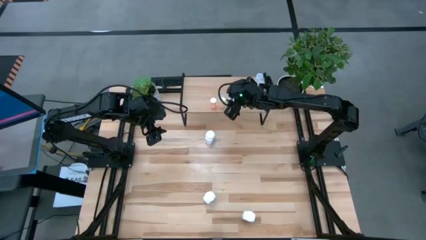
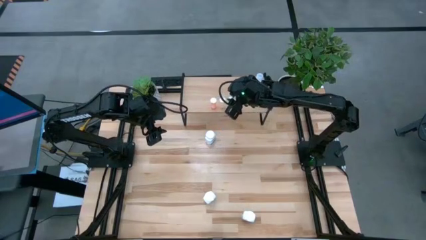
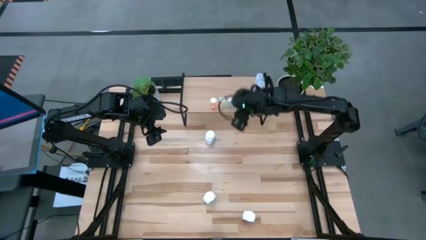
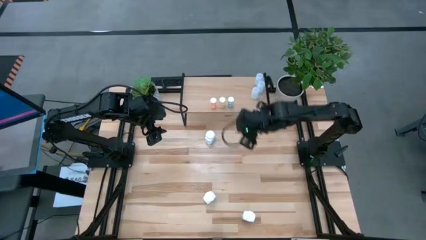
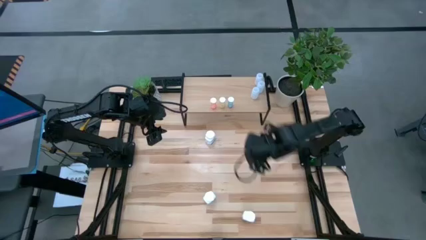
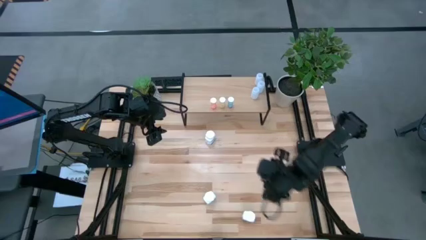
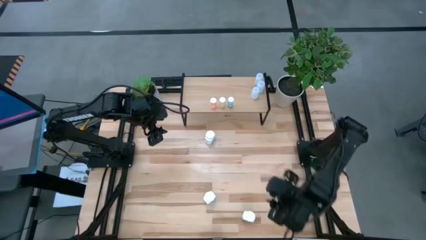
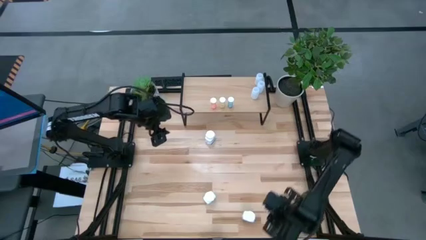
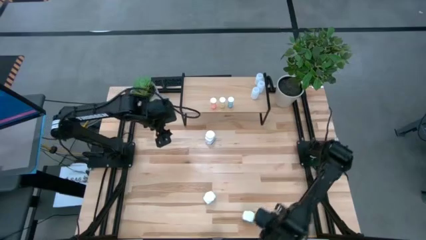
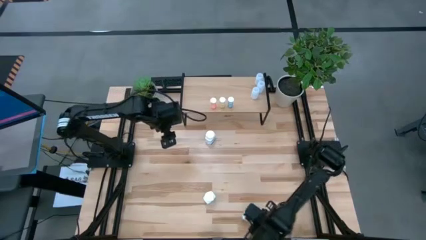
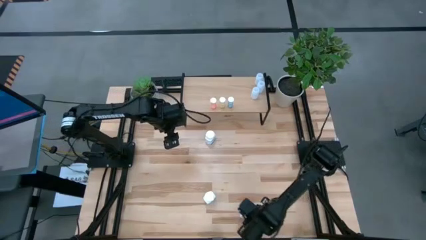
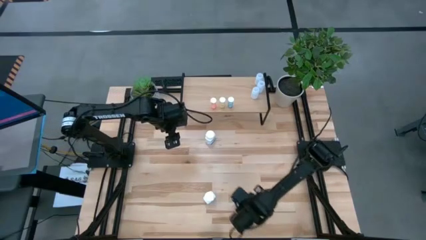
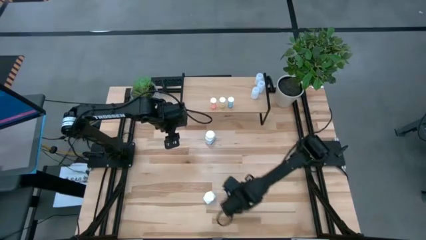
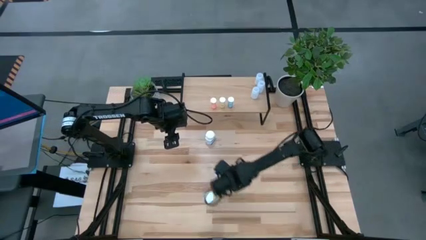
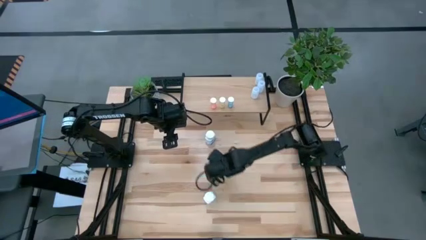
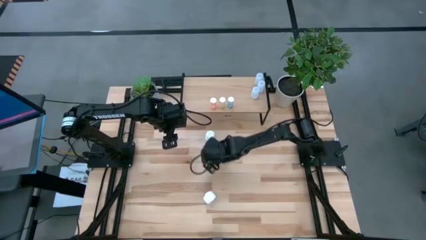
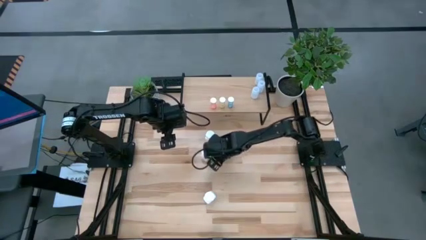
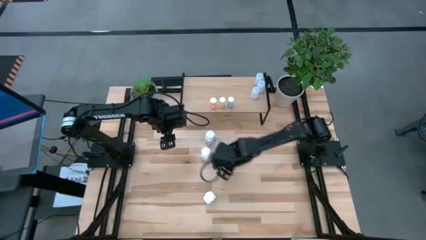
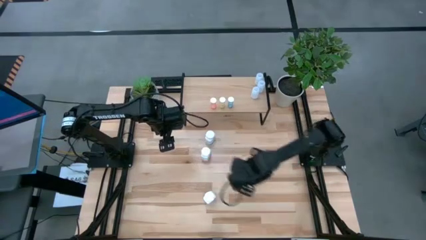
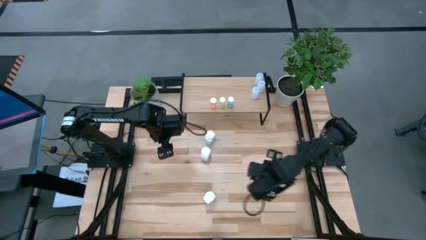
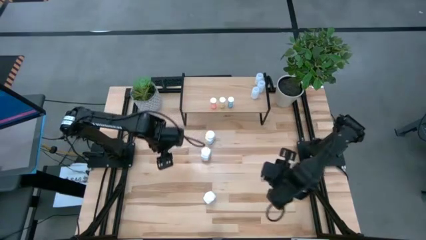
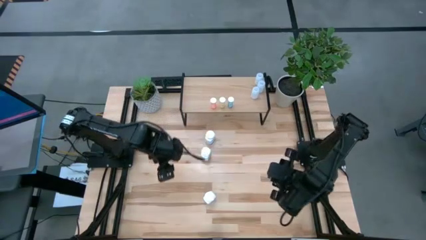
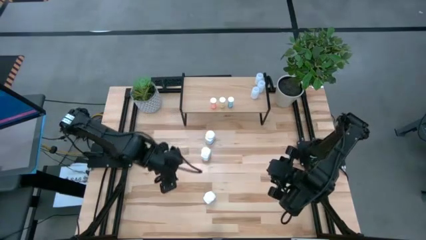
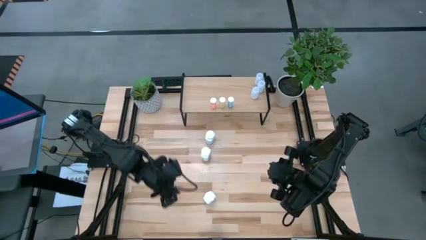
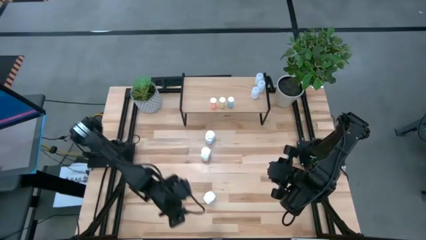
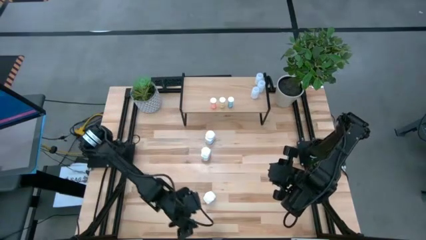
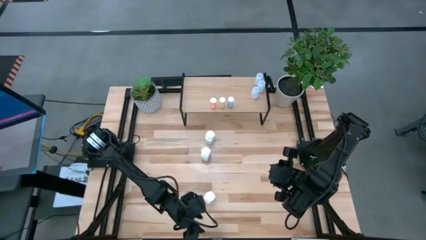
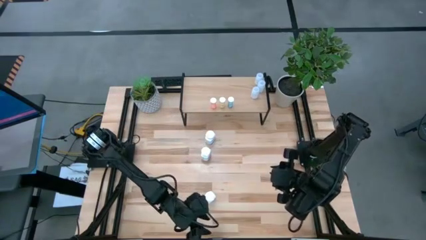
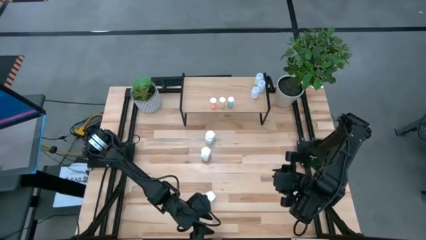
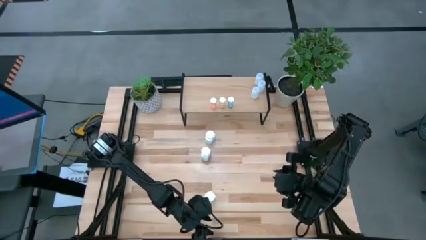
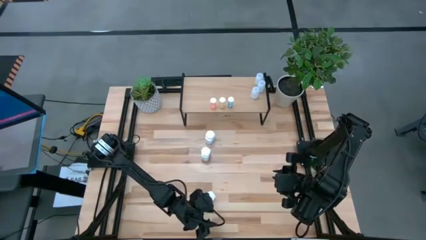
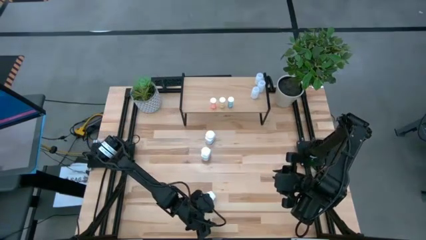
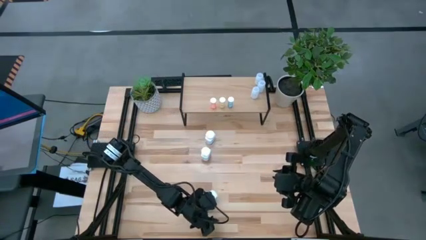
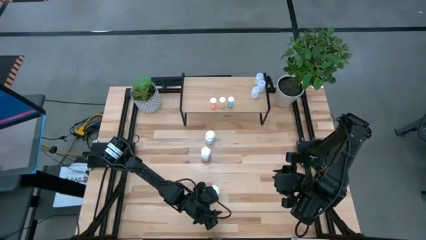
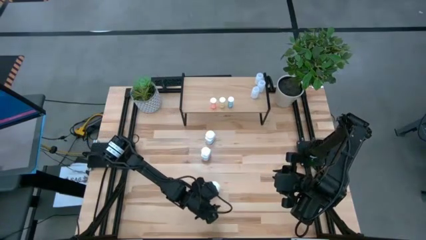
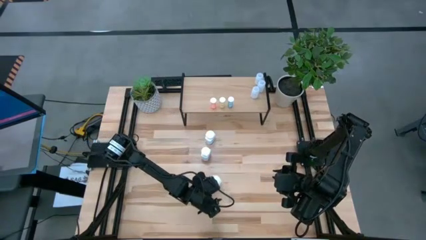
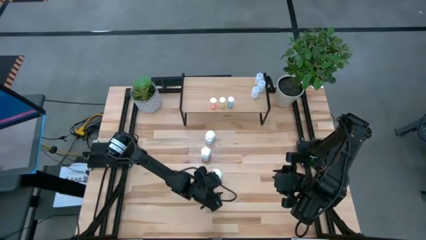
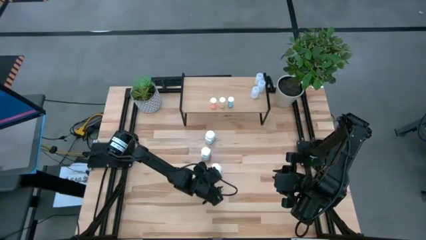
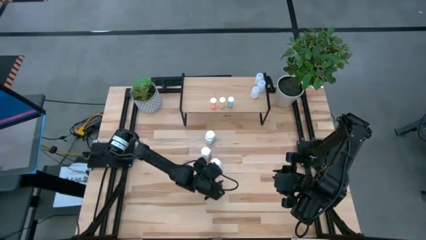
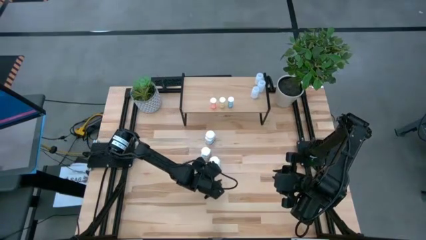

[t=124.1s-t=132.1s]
Task: Pick and place medicine bottles onto shelf by color
Move the white medicine bottles

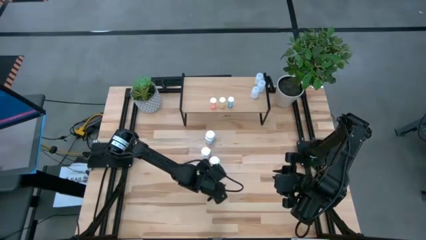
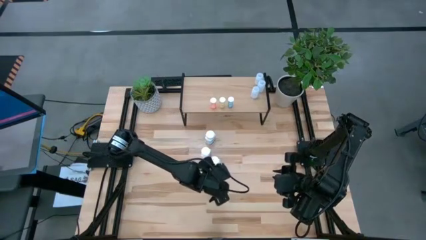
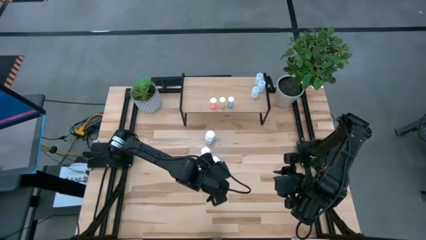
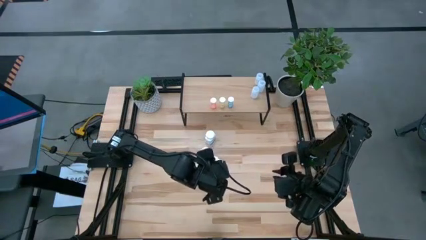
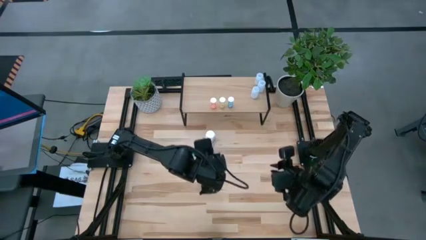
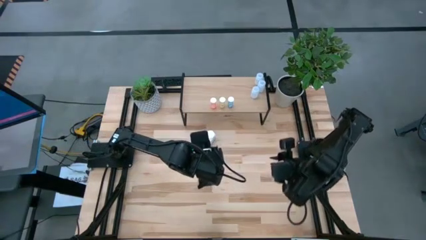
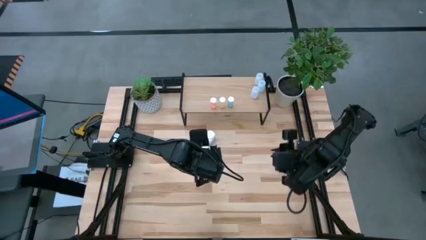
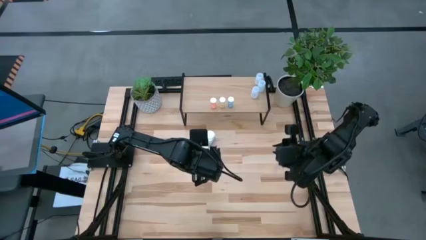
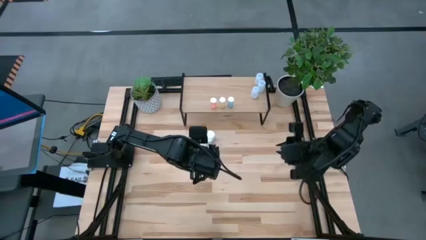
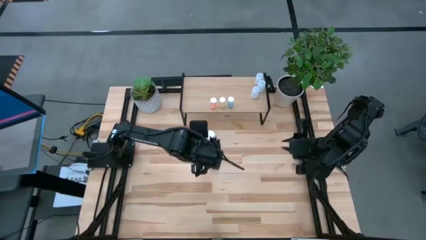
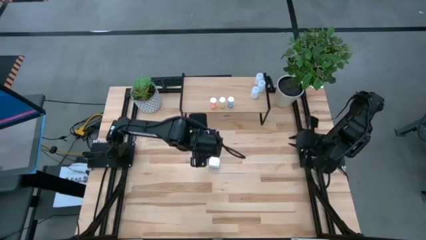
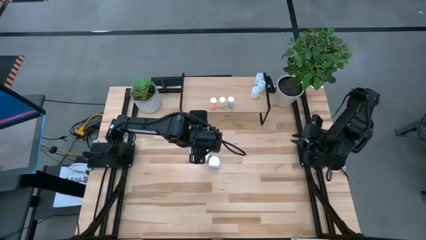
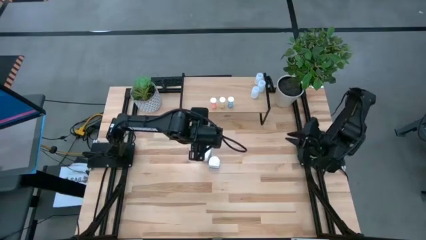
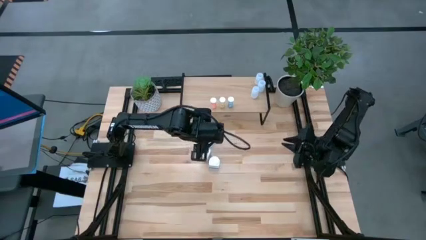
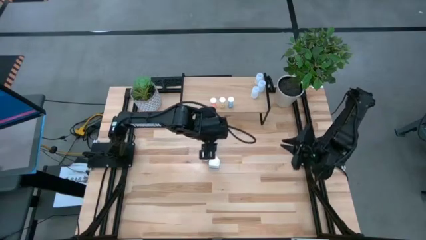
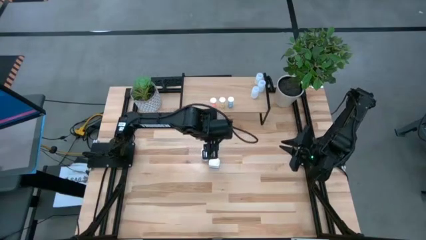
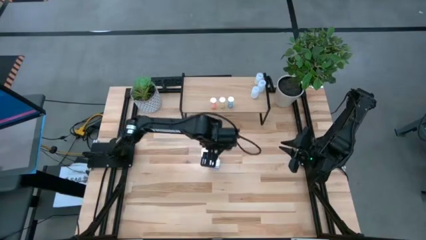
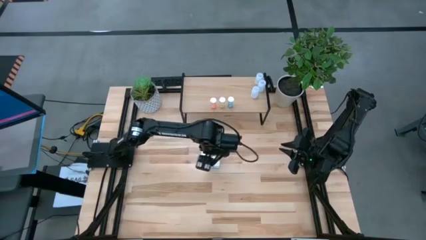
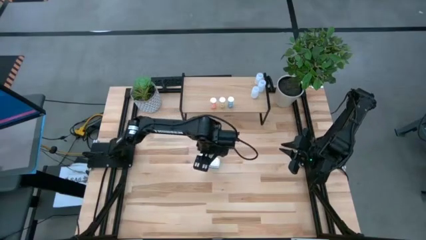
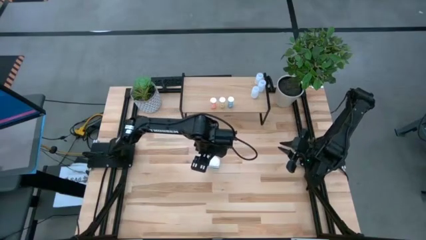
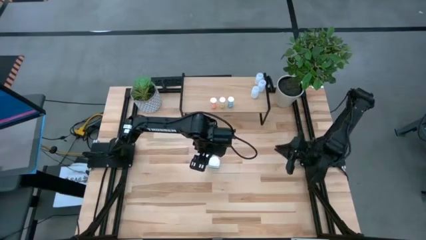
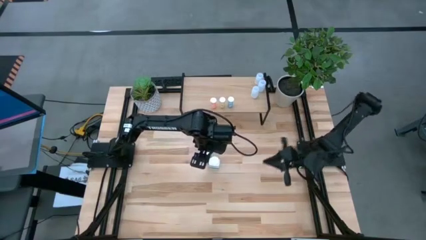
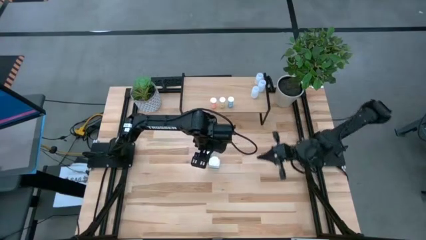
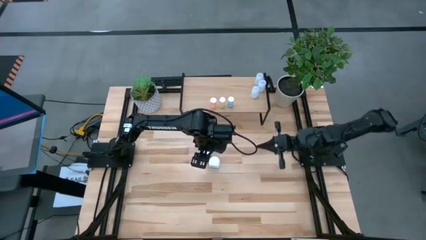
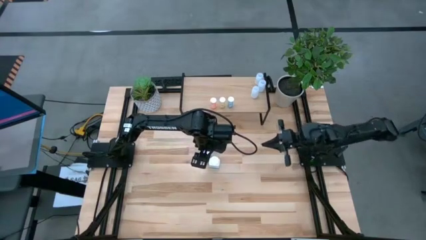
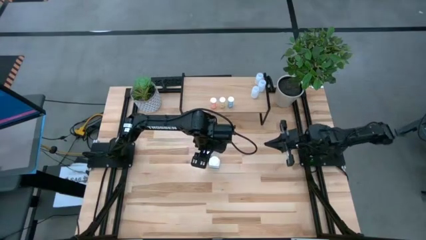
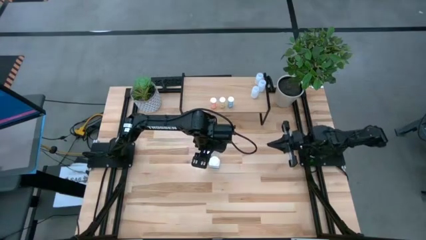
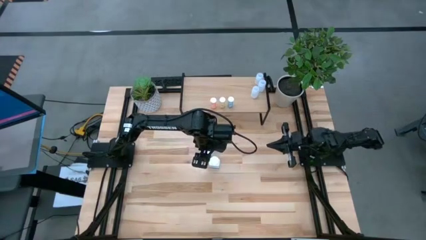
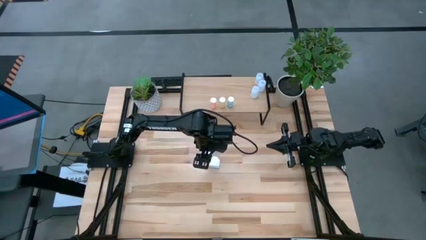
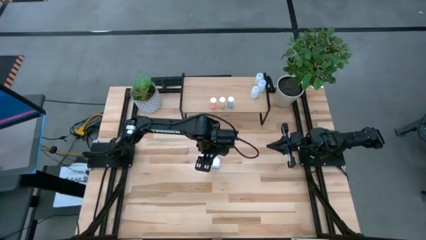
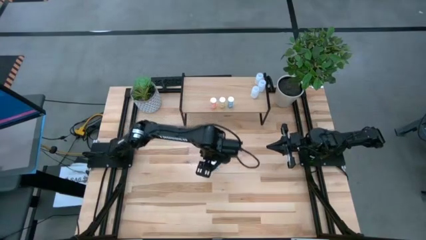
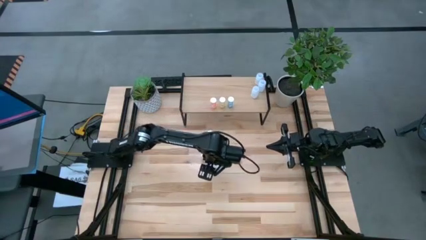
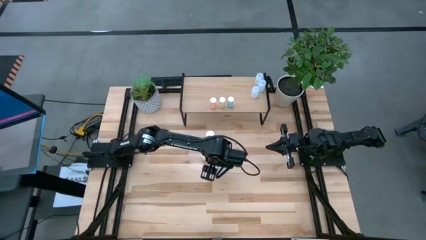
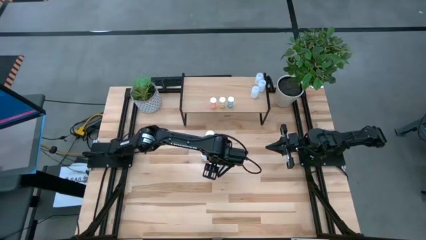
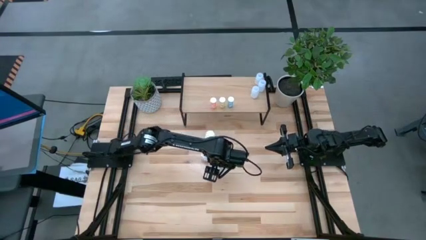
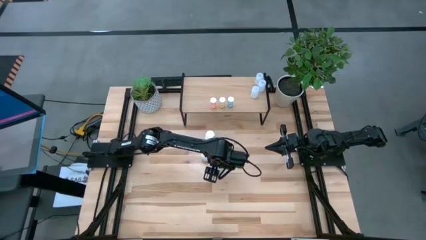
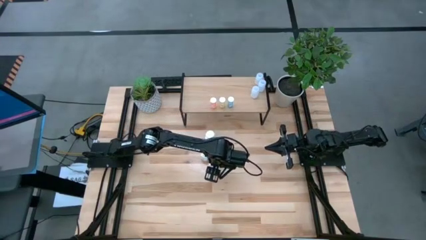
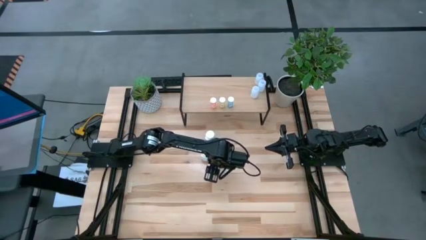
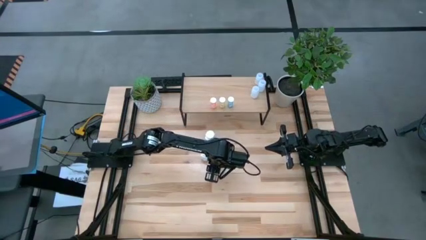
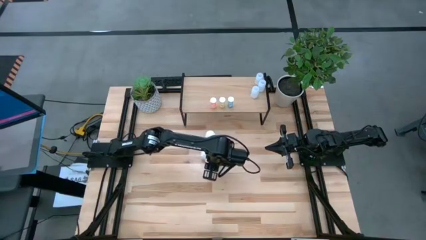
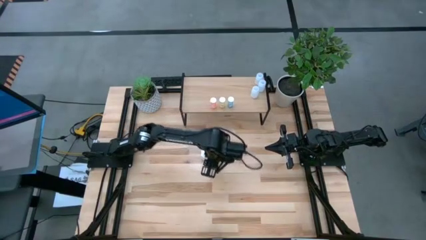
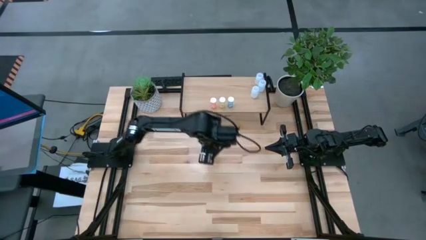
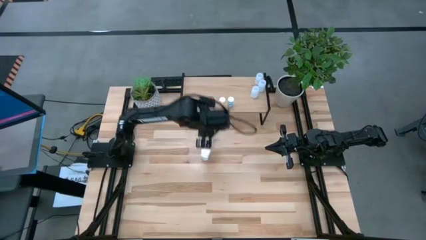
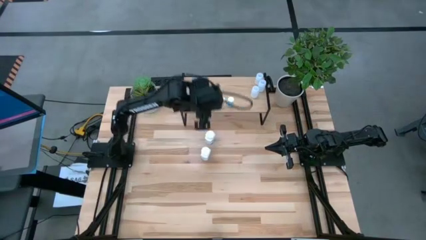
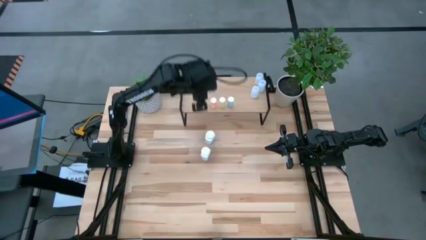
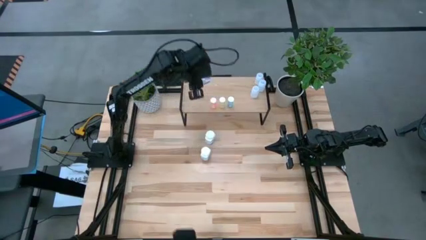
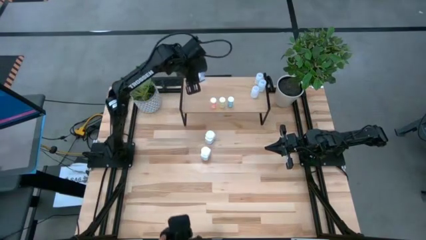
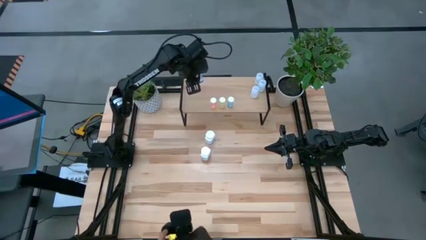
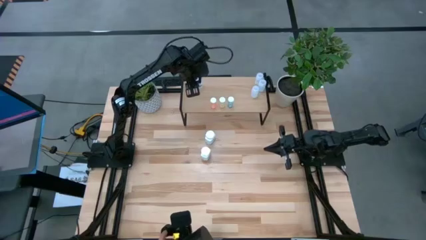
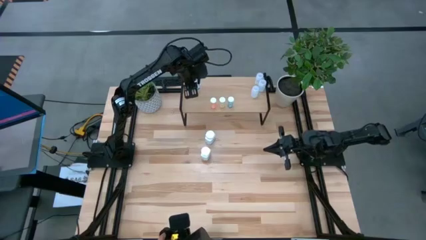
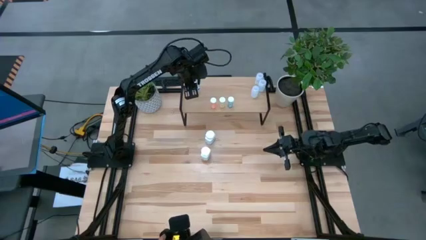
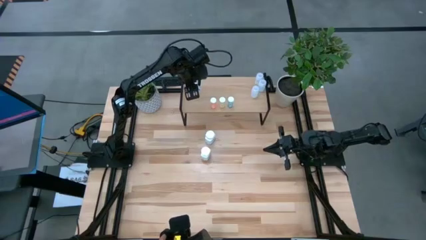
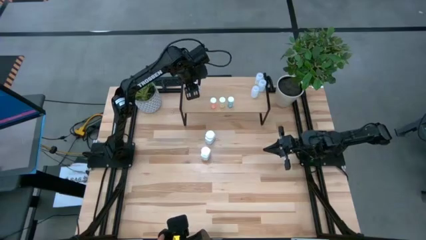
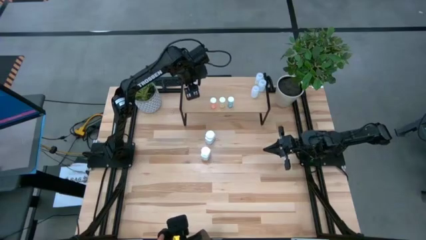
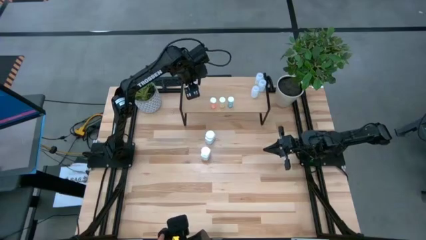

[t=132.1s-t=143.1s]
Put the bottom white medicine bottle on the shelf
